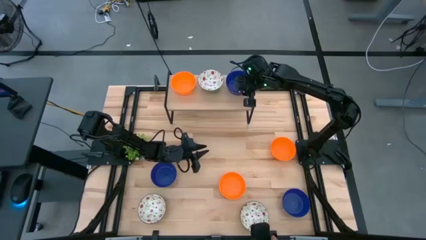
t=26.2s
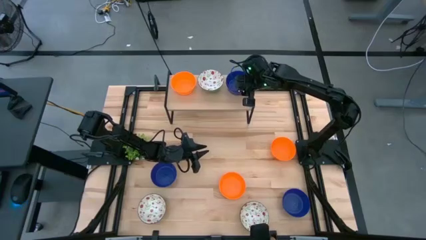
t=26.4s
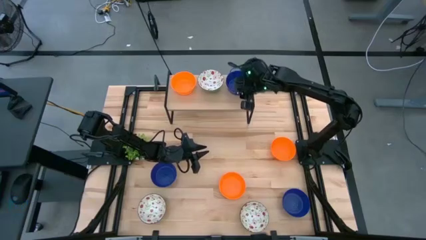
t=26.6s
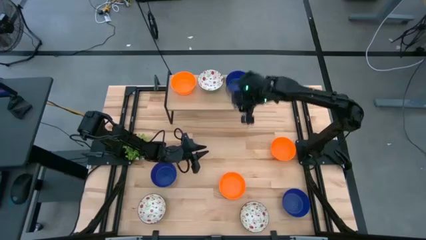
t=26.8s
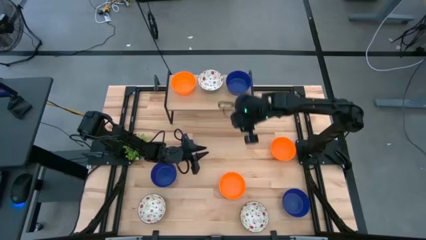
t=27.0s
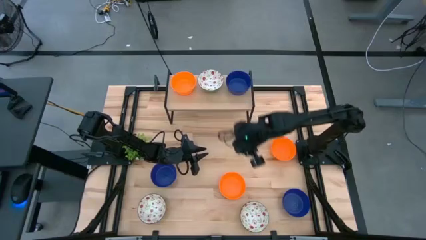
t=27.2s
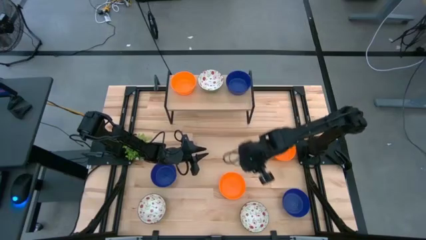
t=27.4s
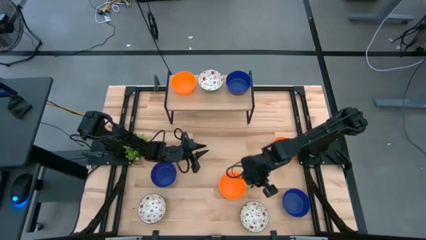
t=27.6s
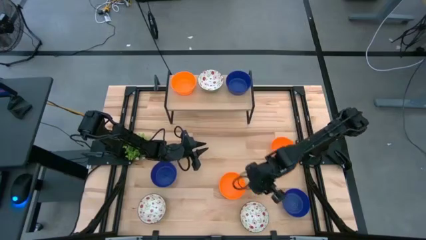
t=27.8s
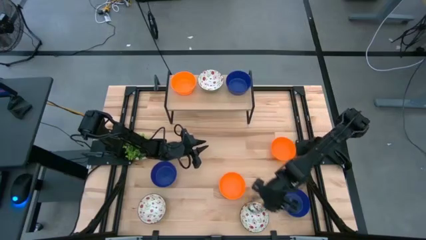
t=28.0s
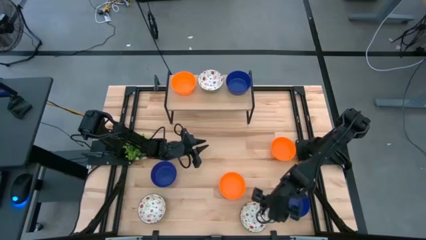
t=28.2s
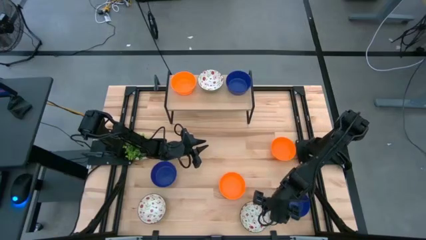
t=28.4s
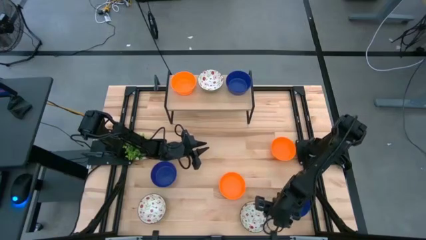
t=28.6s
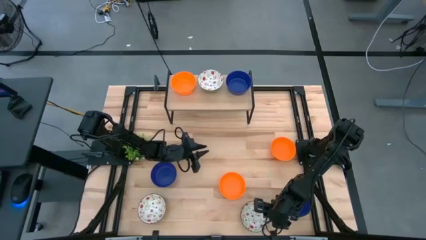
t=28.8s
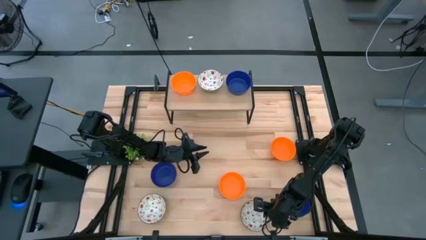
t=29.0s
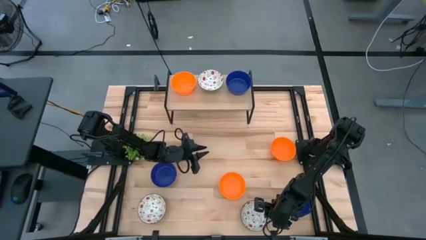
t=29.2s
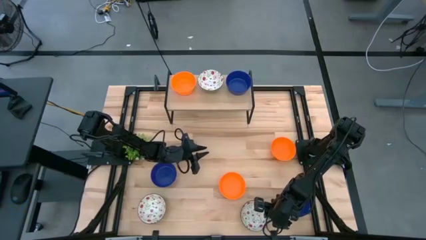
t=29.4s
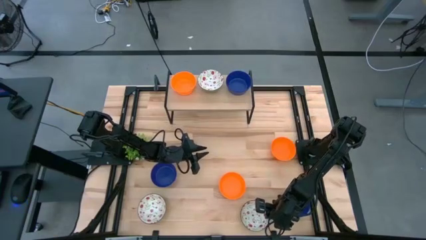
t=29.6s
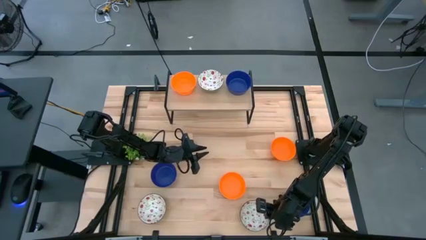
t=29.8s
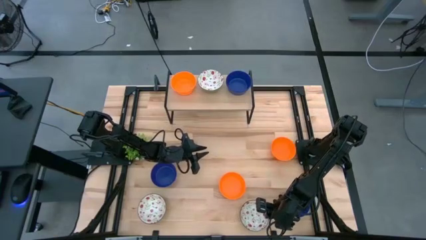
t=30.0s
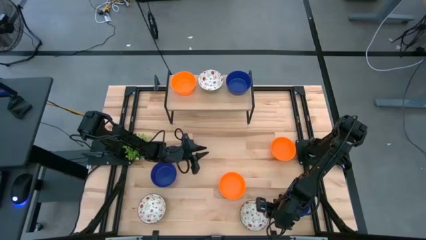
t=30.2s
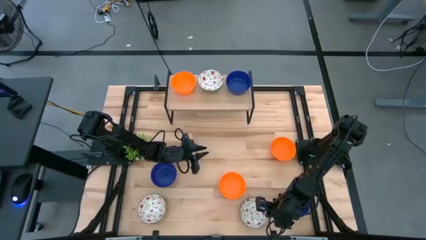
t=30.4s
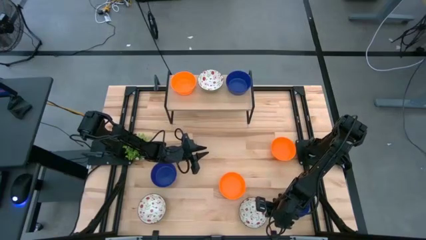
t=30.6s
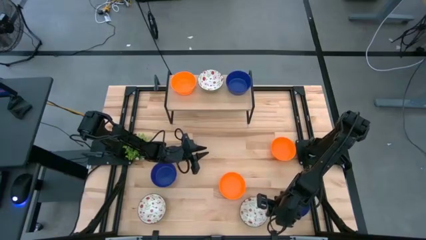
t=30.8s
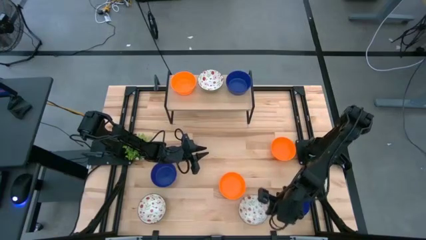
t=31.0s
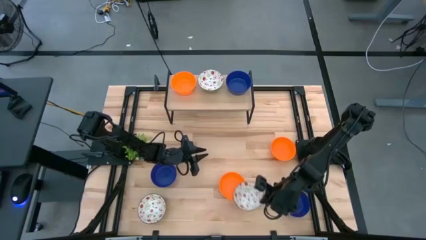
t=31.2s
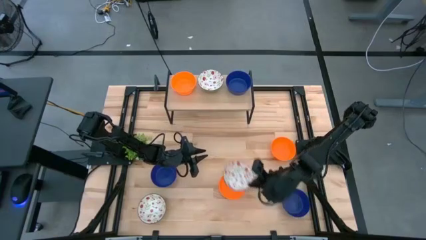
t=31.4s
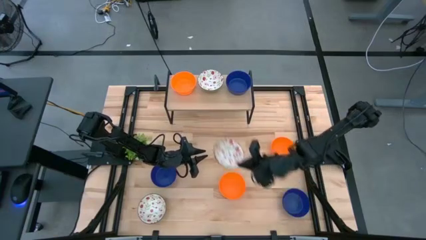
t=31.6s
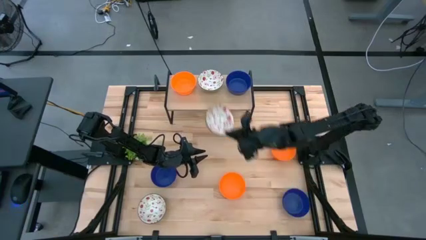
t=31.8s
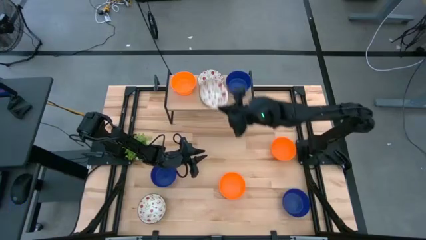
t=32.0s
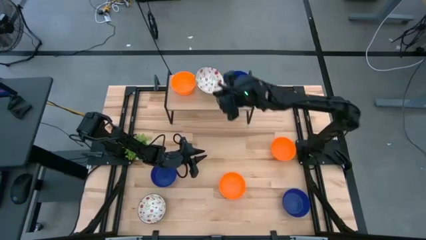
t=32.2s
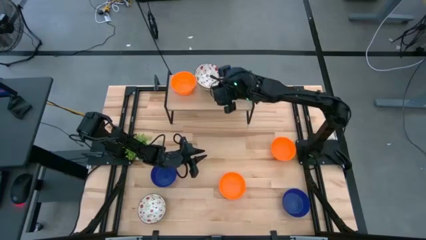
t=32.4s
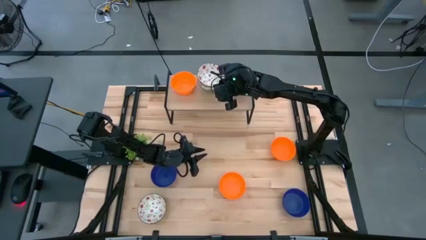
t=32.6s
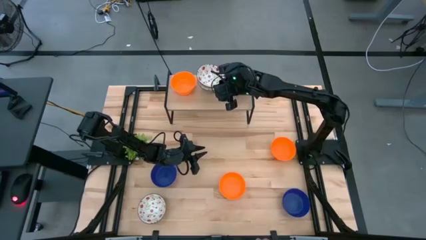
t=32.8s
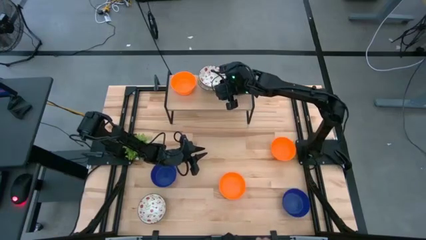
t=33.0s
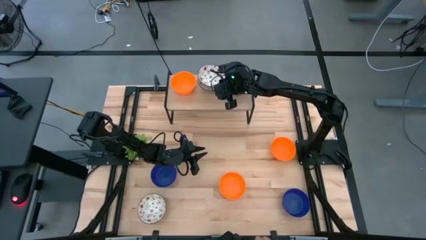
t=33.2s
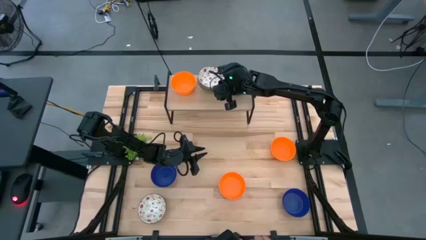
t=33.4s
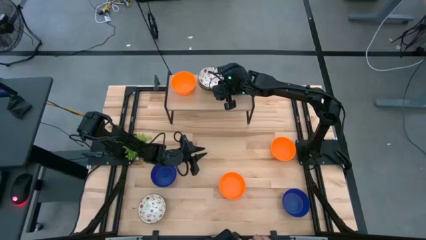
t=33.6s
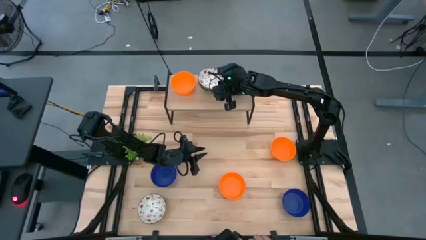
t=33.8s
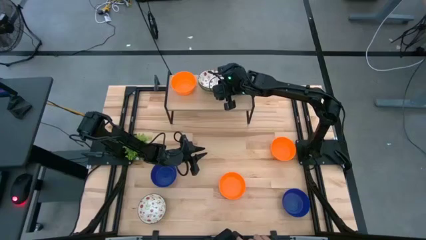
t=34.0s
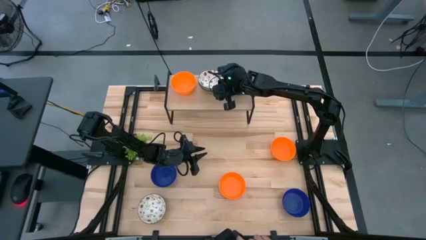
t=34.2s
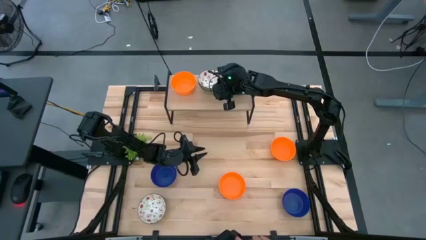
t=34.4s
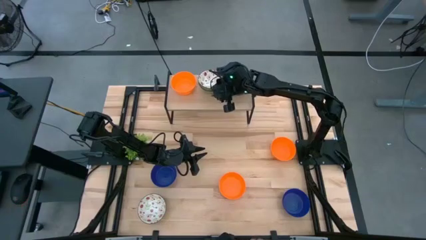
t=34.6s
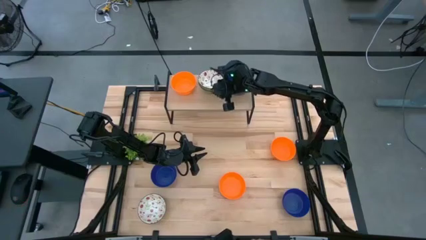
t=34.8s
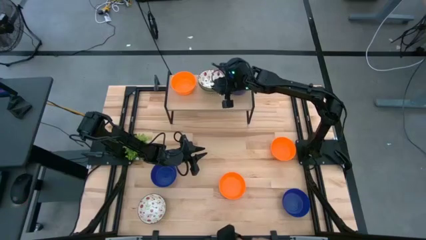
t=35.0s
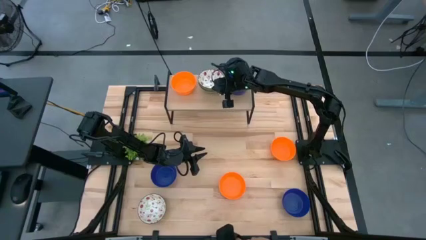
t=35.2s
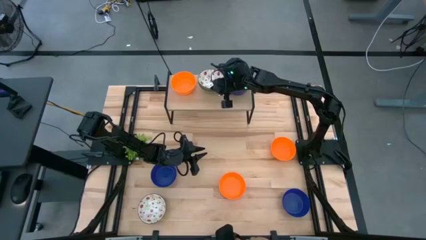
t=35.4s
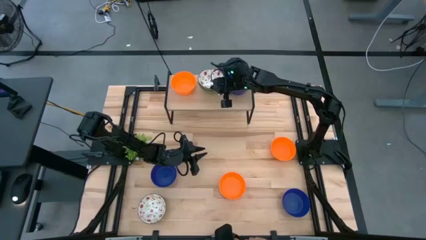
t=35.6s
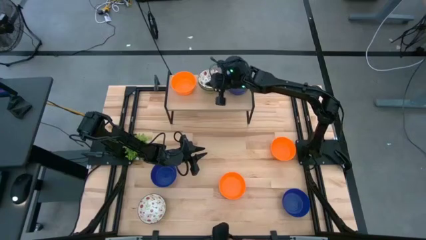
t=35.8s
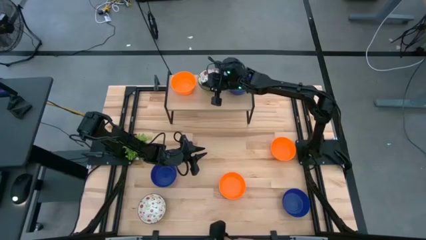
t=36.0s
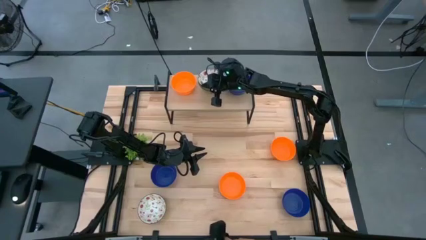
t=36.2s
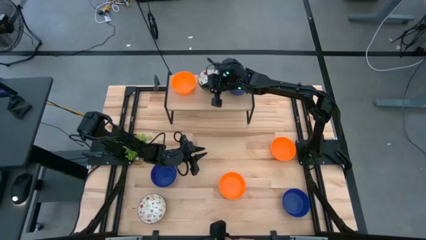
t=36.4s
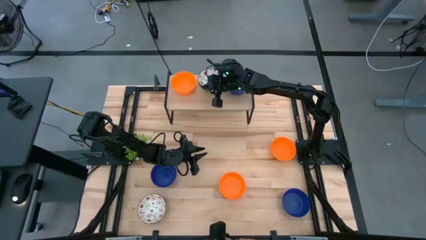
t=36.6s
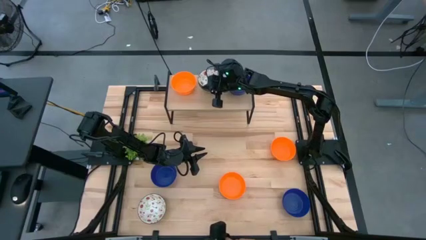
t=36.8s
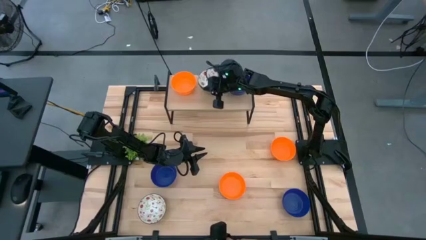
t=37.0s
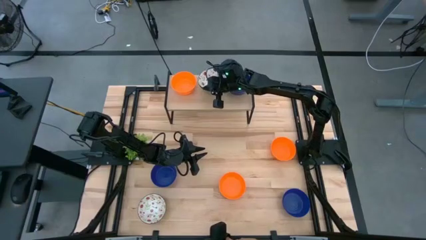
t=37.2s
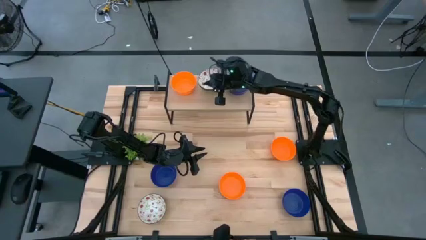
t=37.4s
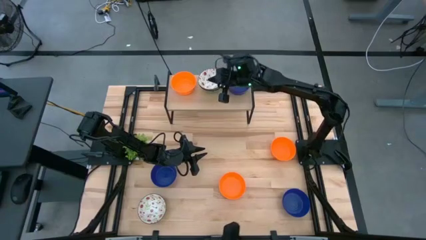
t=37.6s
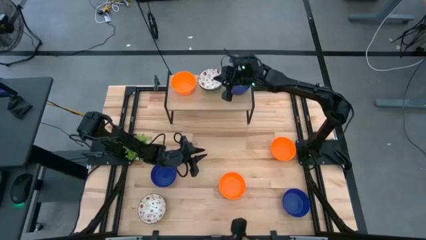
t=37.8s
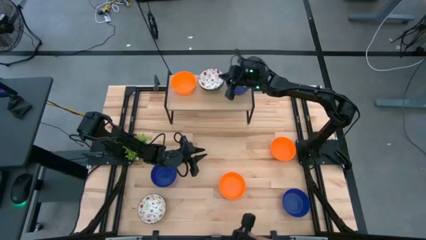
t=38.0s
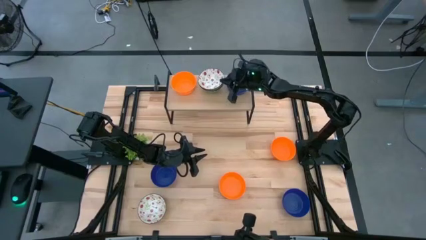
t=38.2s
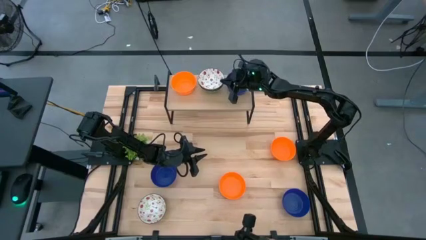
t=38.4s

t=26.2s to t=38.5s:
Task: Pick & Place Mini bowls
Stack the green patterned bowl on top of the other green patterned bowl on the shelf

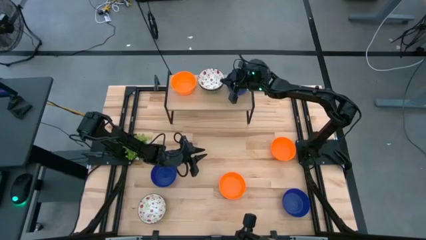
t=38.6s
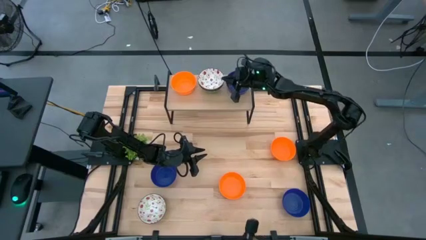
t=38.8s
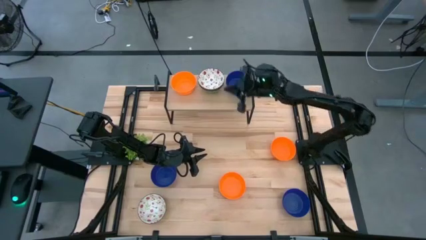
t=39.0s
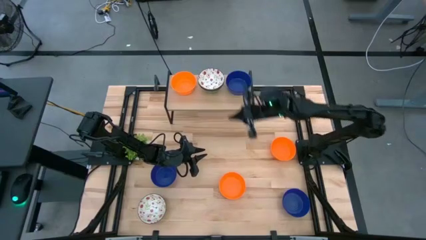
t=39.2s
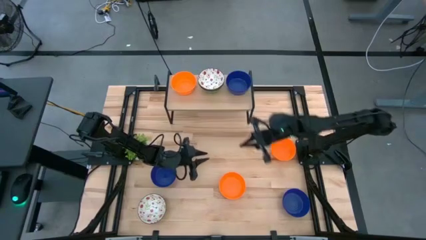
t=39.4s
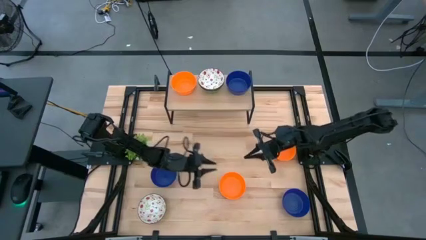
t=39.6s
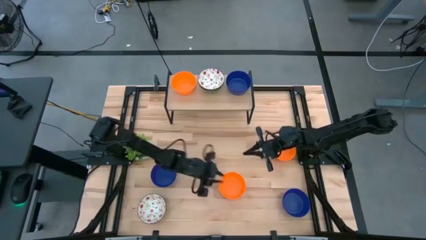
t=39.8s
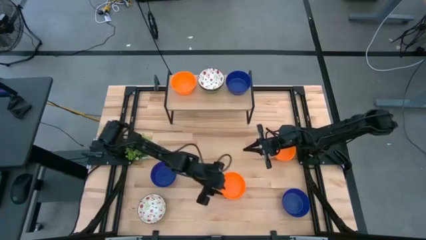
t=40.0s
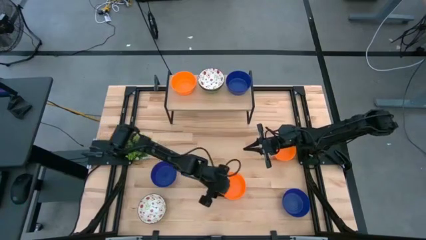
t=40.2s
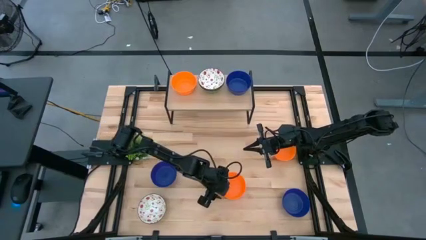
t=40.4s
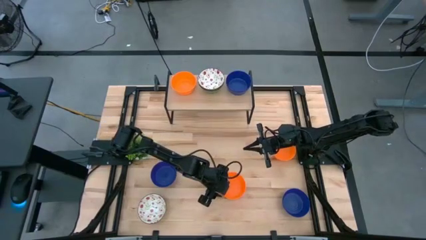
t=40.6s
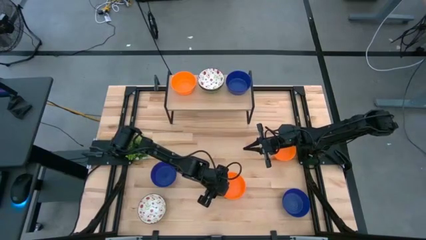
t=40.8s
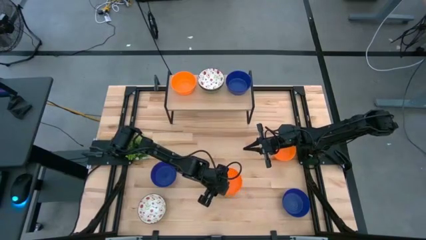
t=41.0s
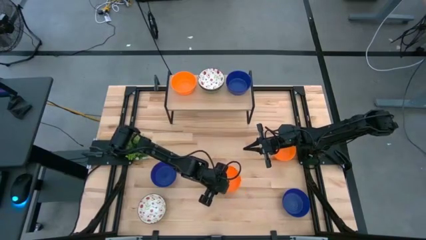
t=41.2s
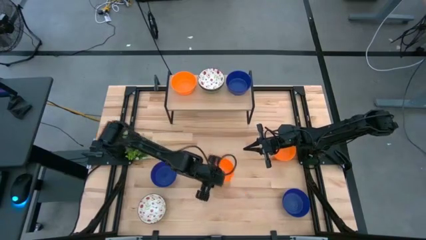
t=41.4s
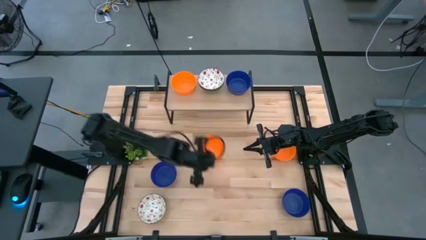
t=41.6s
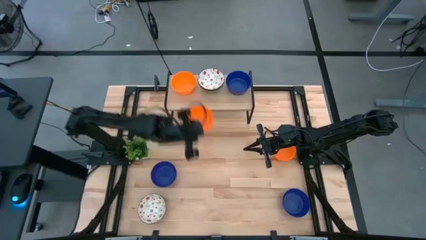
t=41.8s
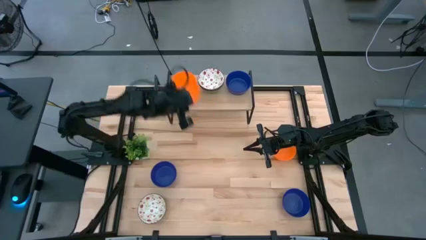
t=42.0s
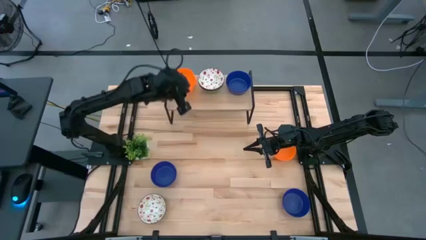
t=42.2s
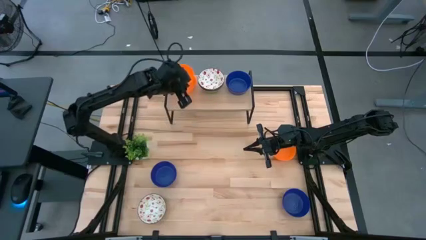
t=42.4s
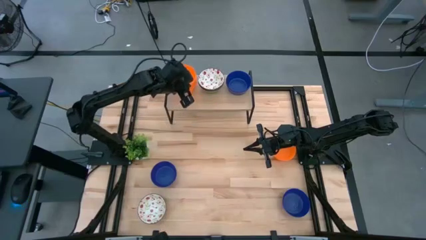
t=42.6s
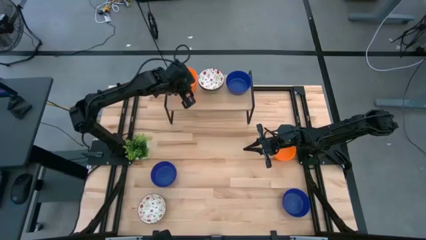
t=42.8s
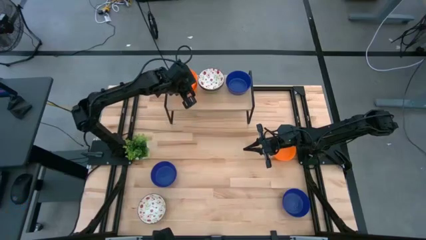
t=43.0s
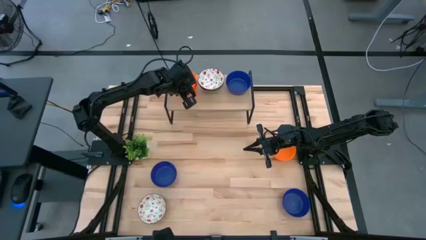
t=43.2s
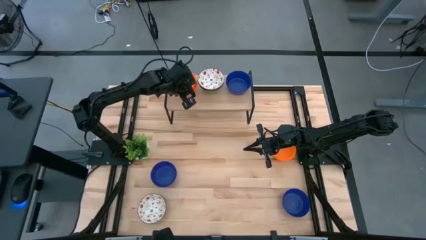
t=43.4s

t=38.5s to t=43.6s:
Stack the orange bowl on top of the other orange bowl on the shelf
